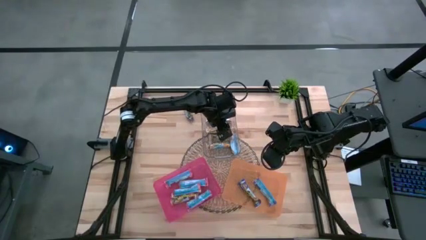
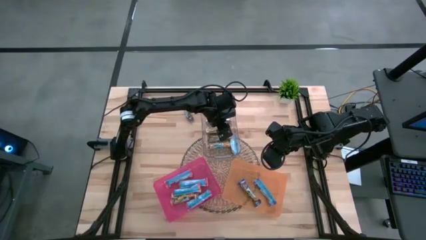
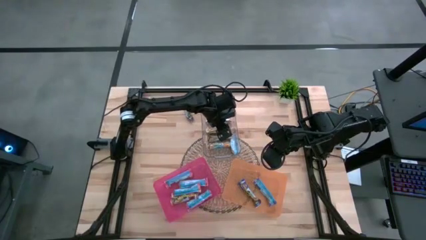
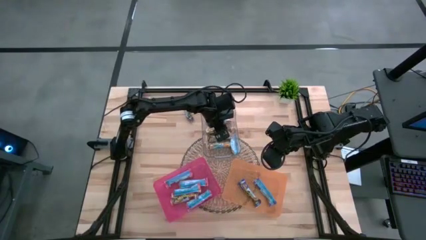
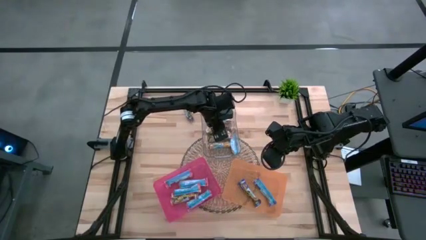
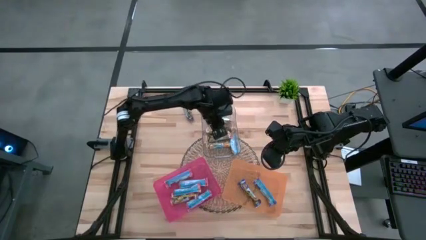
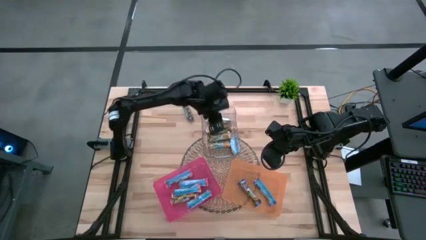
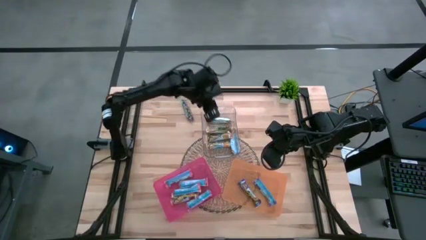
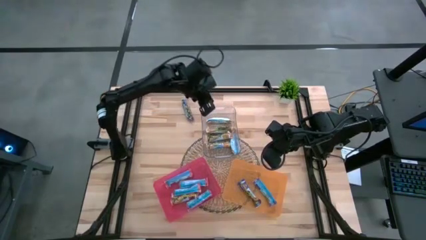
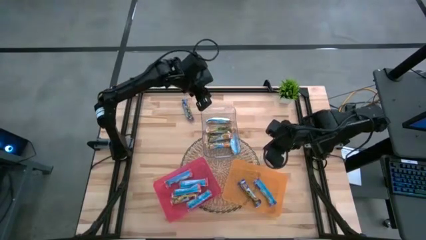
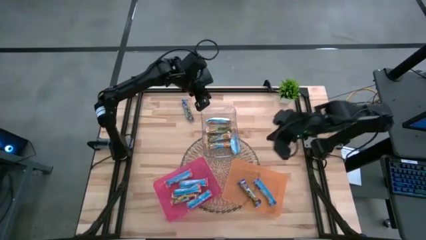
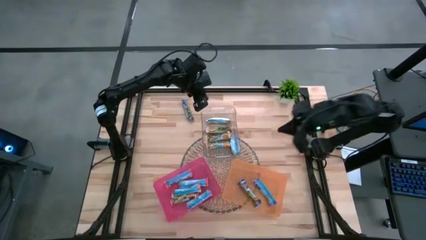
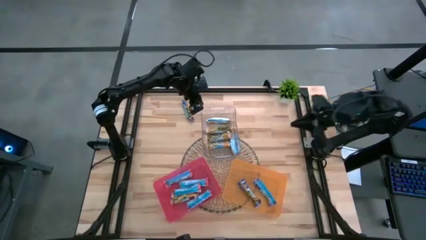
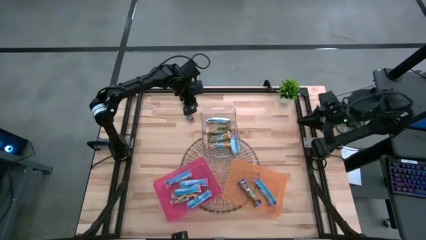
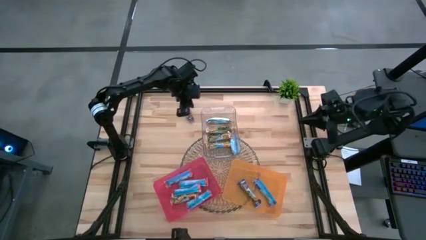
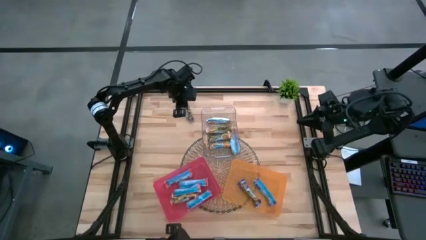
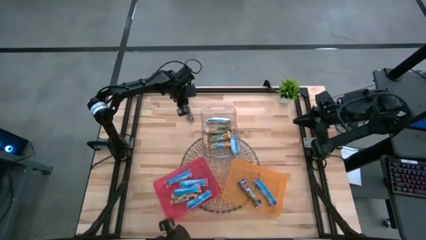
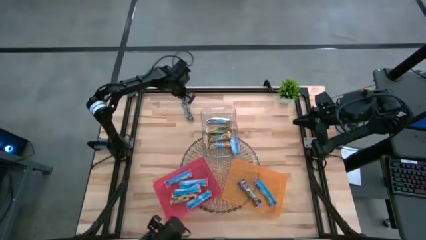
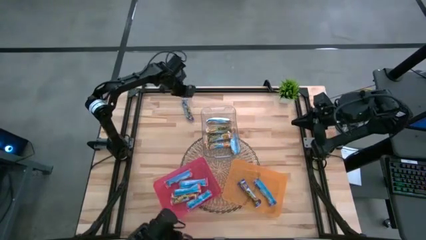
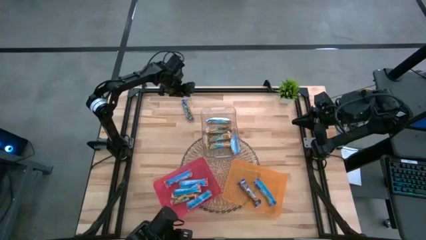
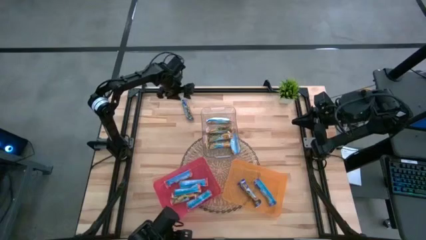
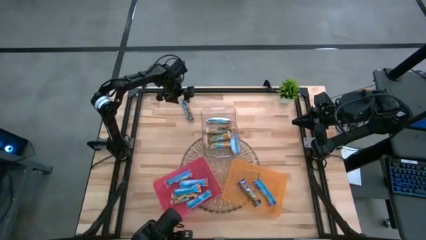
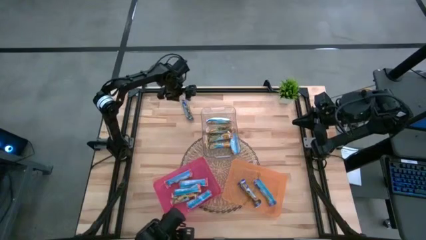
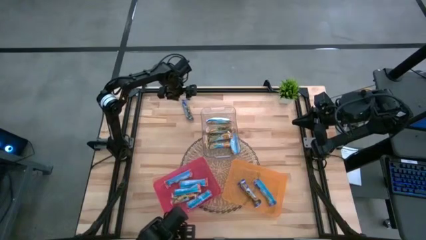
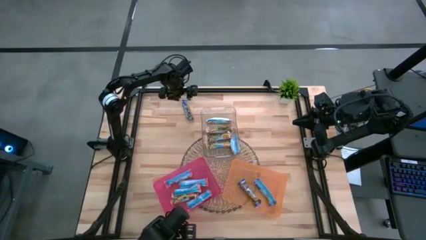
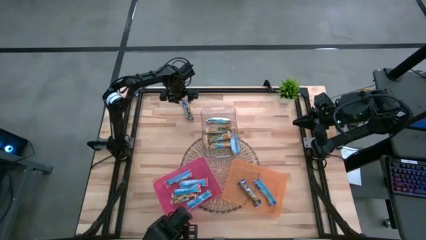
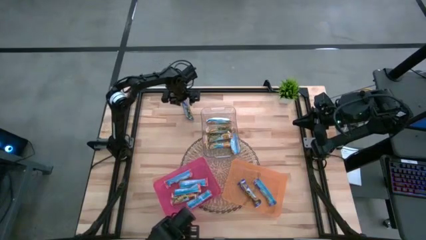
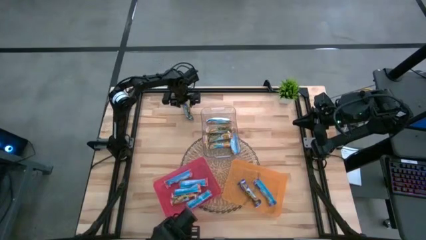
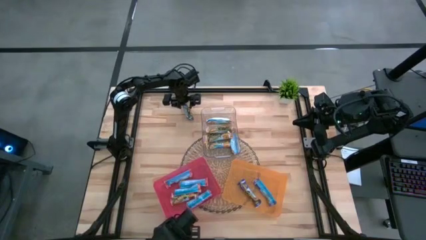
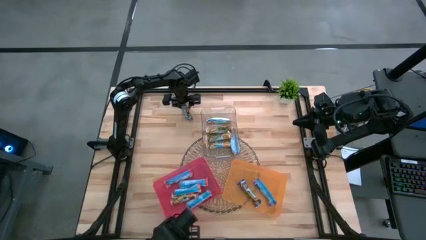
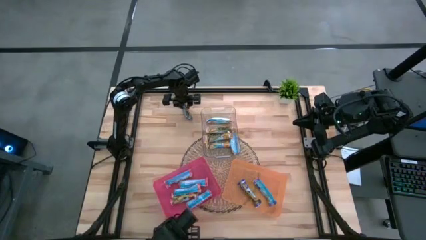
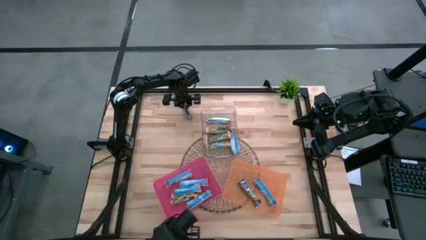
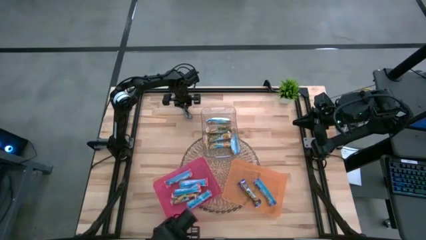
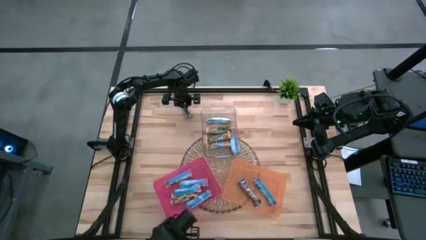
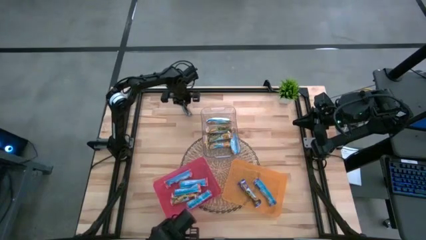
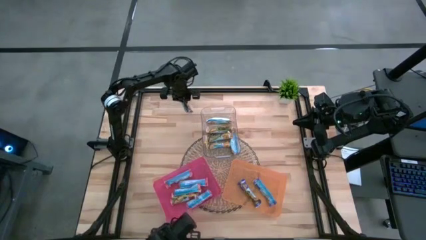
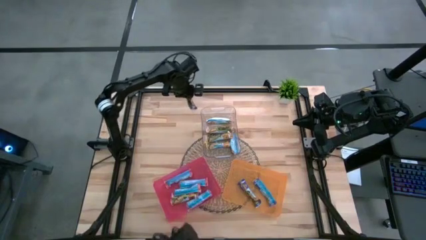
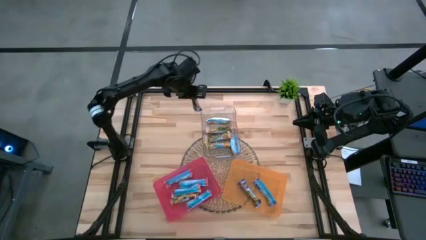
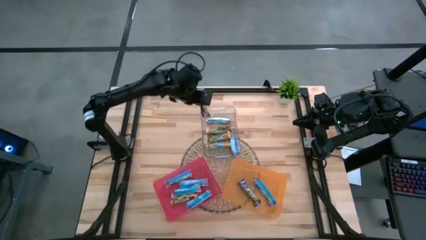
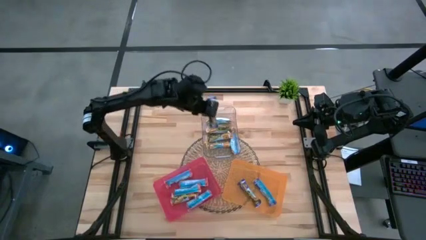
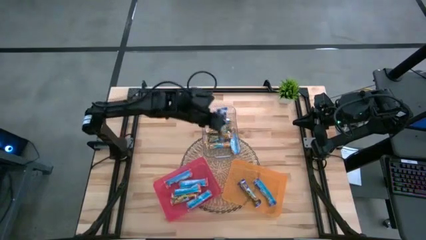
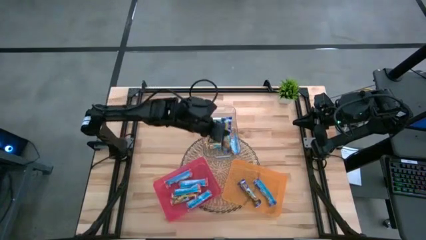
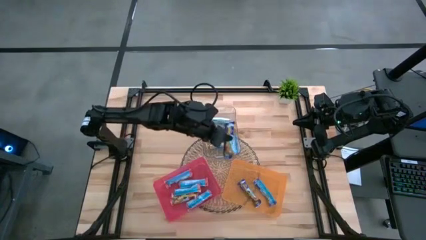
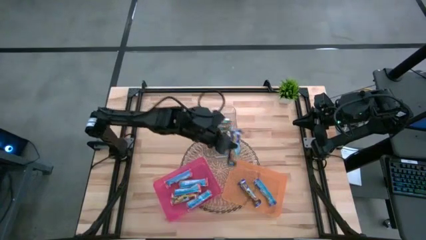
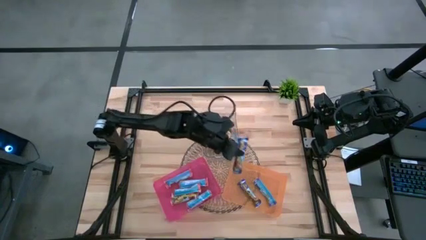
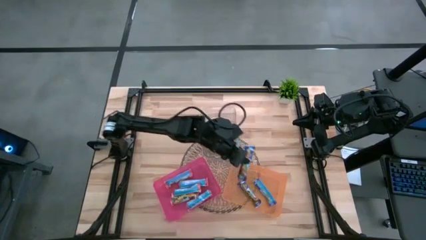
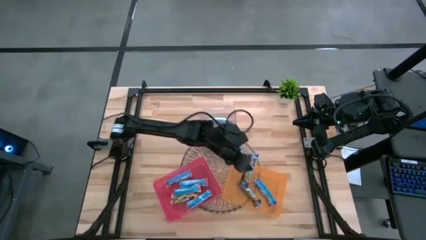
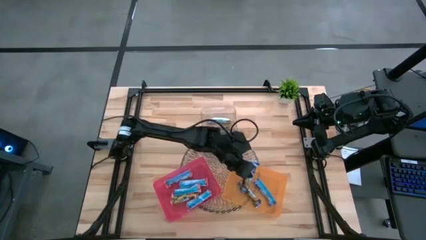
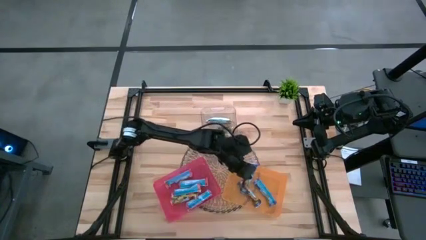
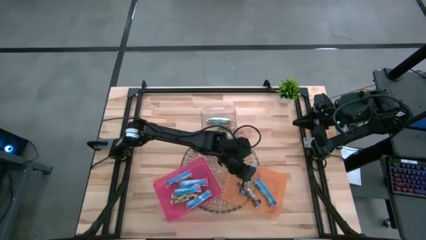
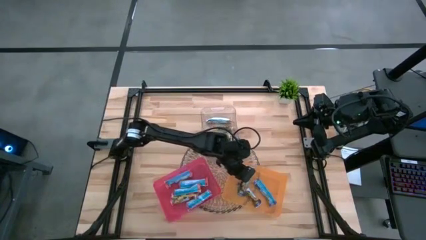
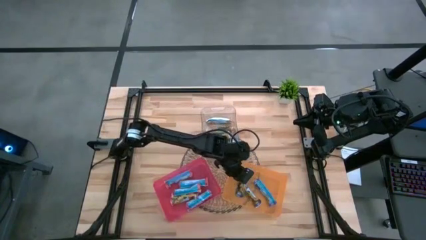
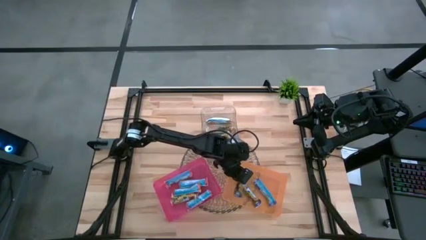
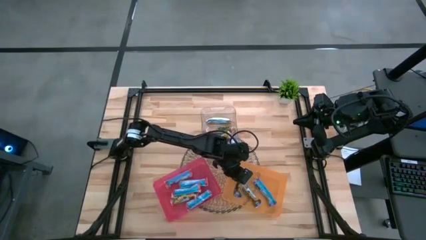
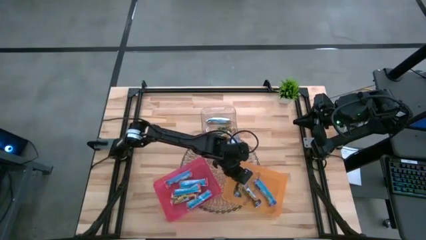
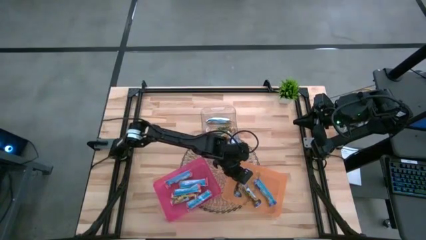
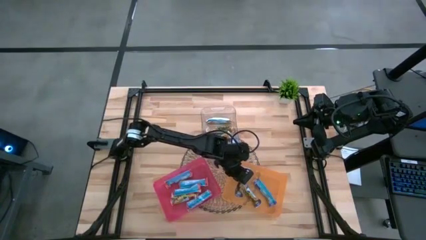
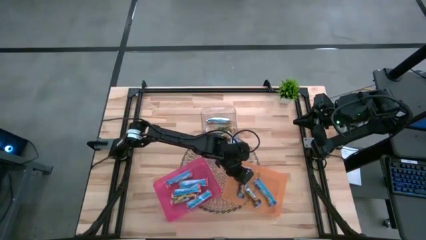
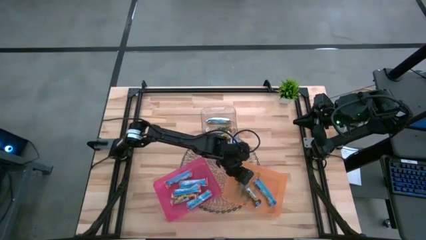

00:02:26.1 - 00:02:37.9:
Task: Pick and place Granola Bars by type
Put the blue granola bar into the orange bin

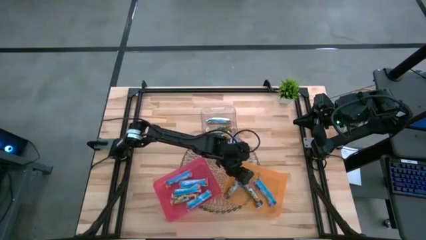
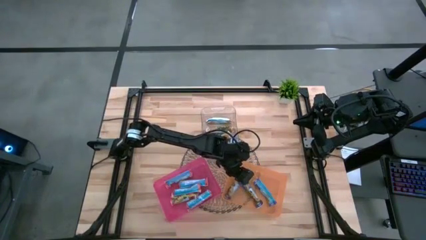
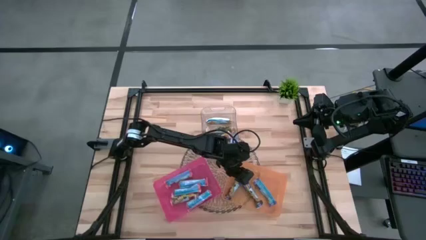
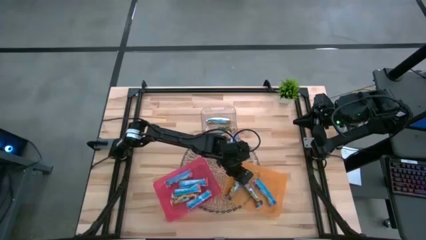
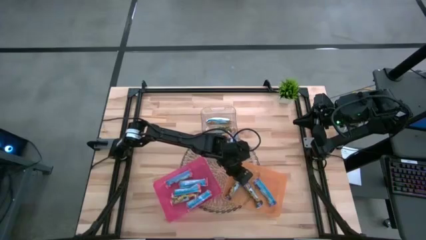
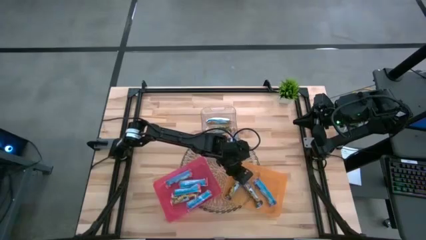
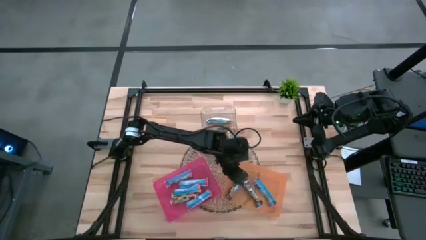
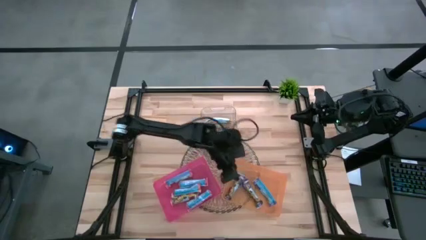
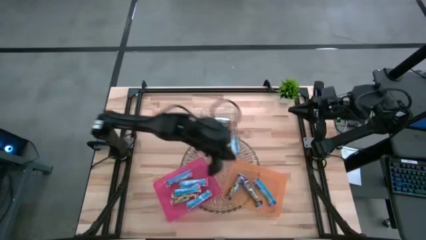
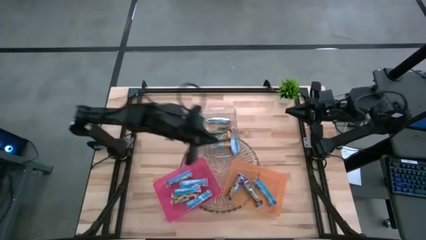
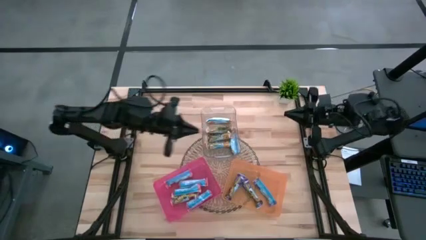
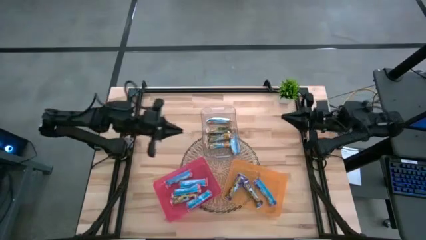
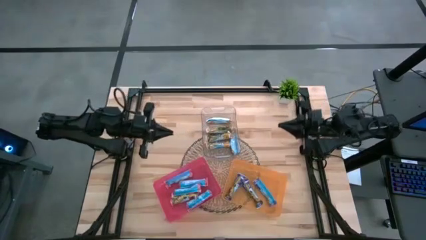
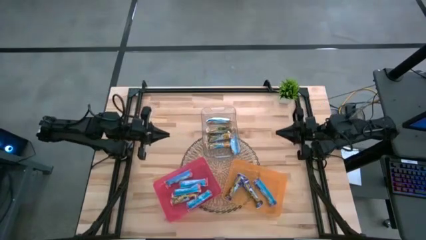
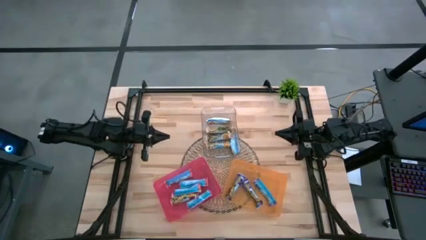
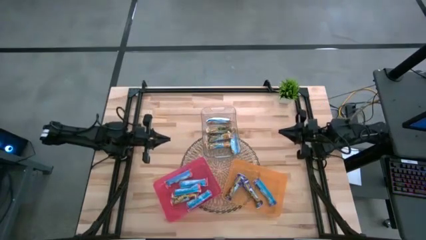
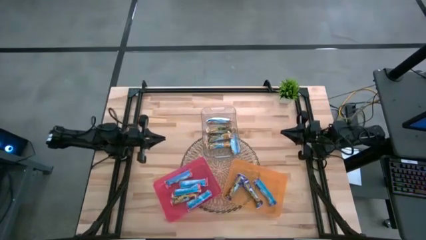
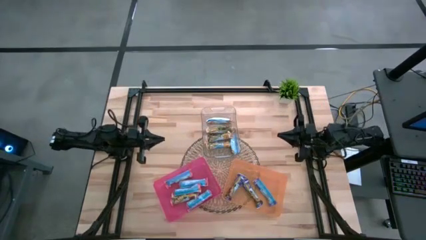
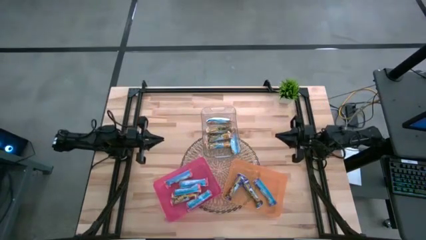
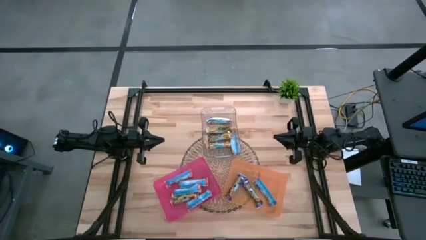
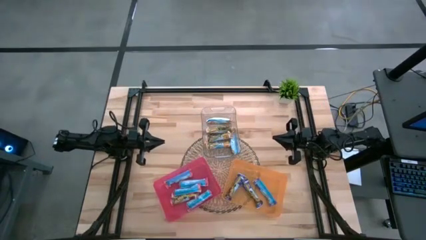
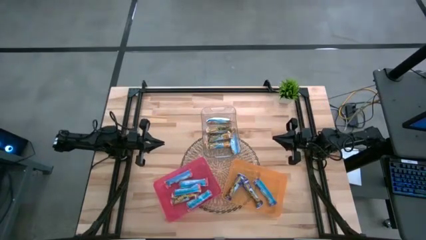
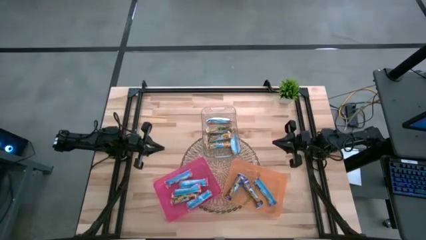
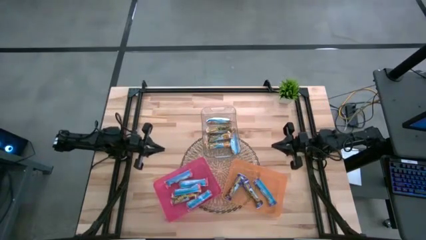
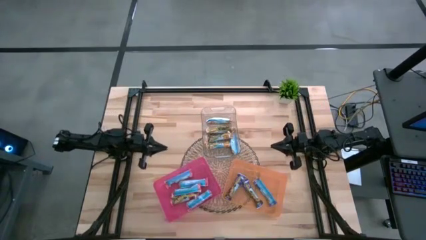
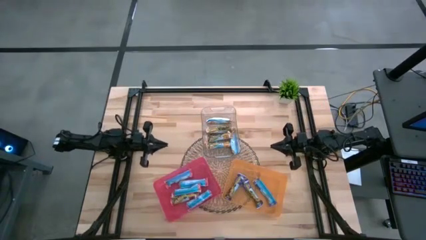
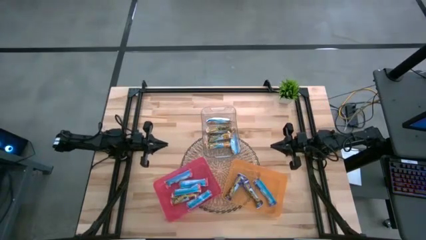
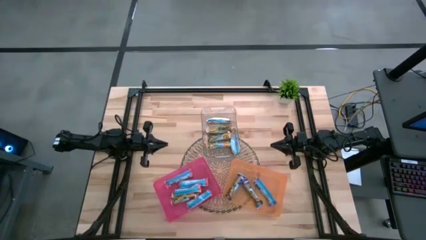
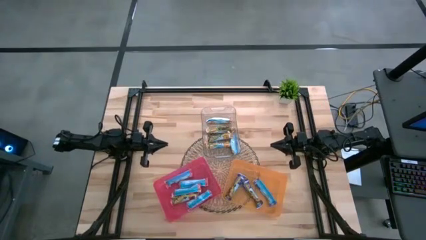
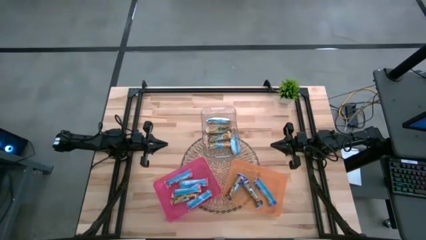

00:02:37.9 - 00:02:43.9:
Return to Home Position
